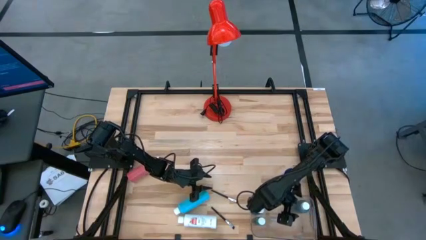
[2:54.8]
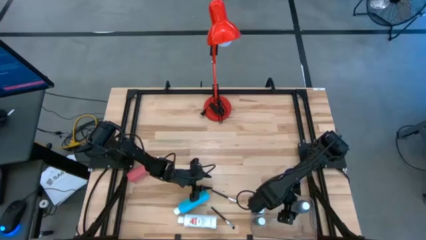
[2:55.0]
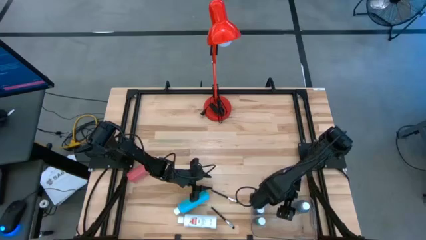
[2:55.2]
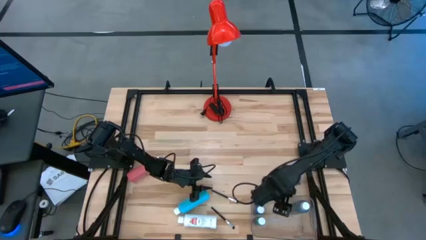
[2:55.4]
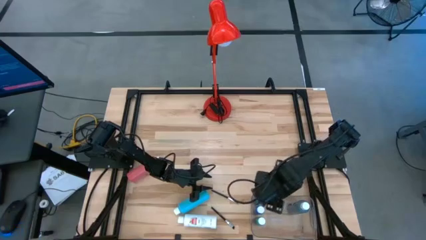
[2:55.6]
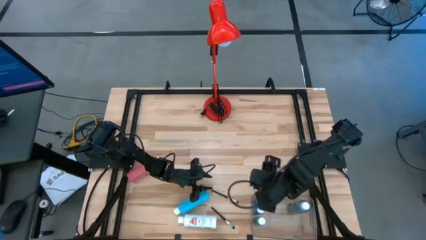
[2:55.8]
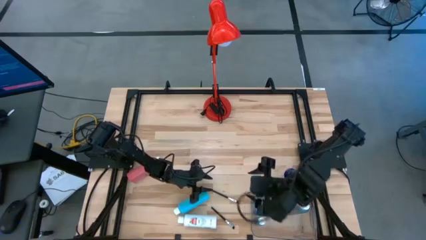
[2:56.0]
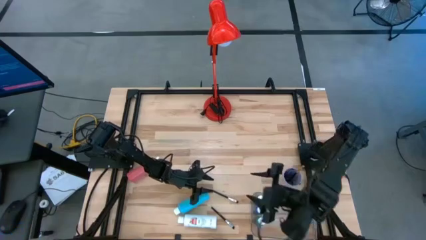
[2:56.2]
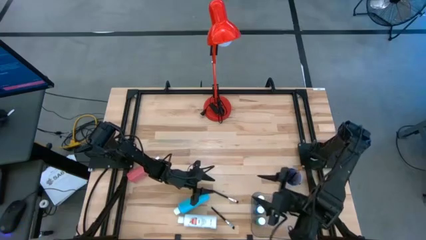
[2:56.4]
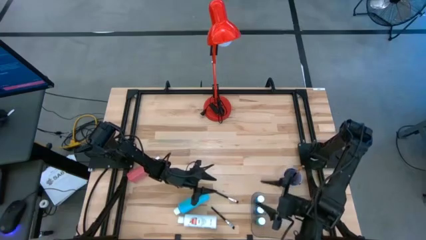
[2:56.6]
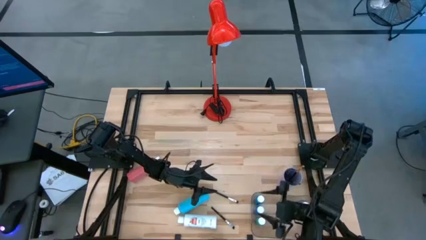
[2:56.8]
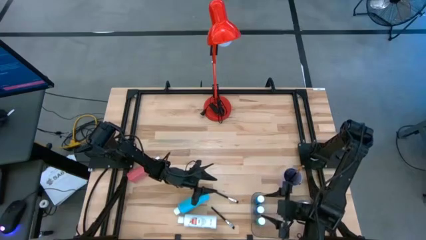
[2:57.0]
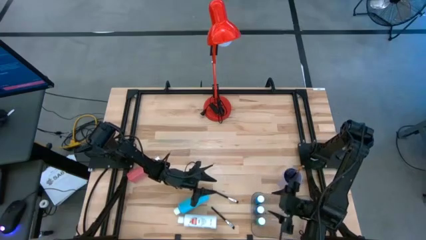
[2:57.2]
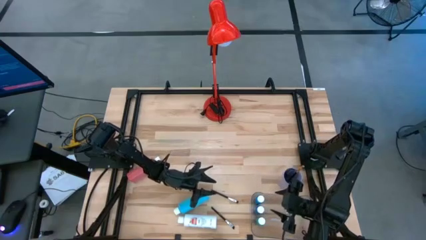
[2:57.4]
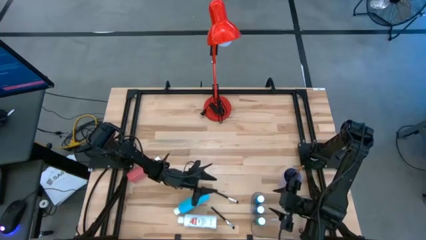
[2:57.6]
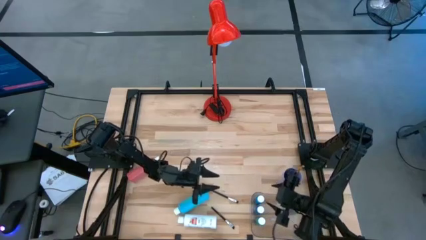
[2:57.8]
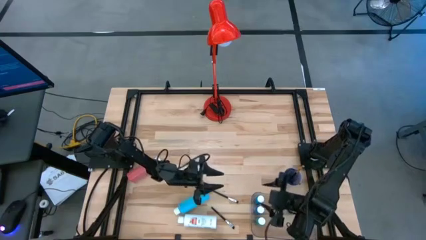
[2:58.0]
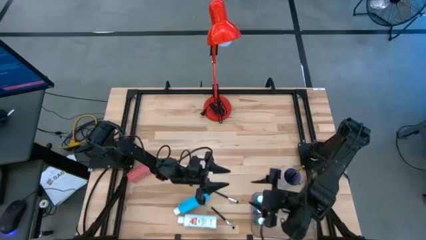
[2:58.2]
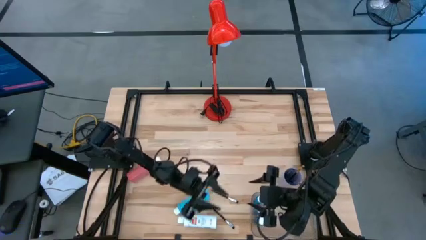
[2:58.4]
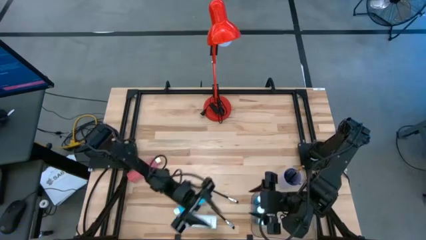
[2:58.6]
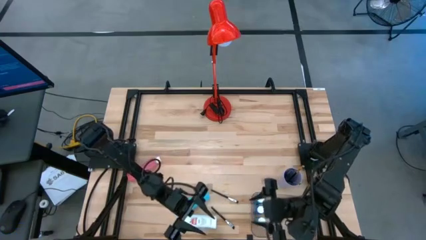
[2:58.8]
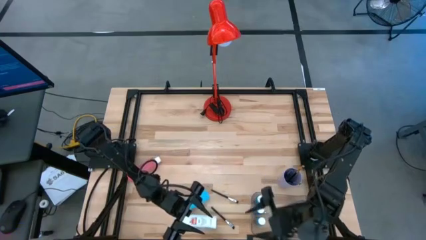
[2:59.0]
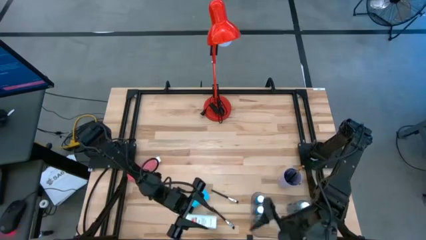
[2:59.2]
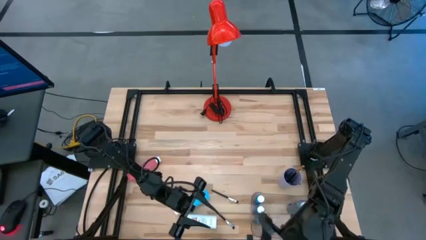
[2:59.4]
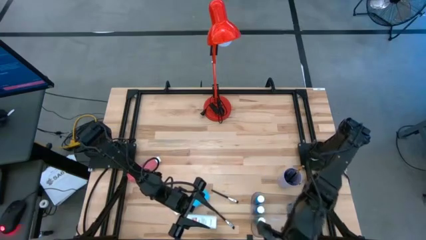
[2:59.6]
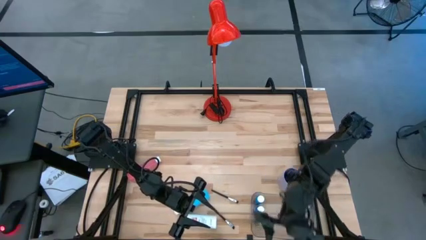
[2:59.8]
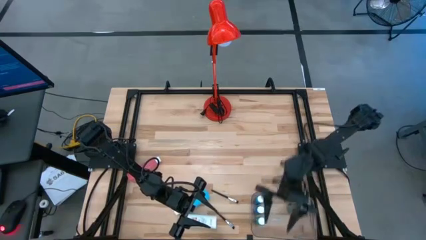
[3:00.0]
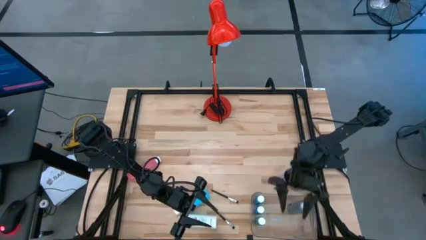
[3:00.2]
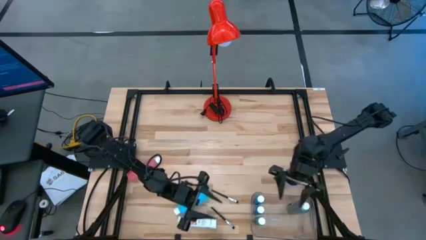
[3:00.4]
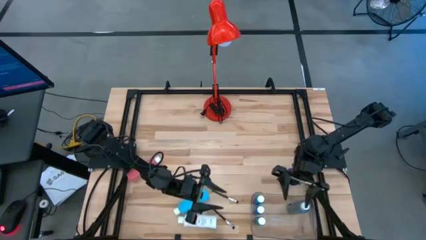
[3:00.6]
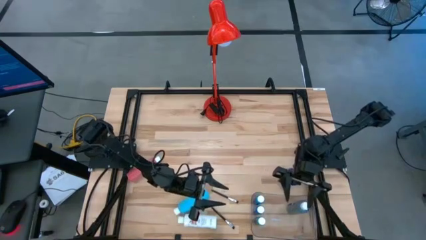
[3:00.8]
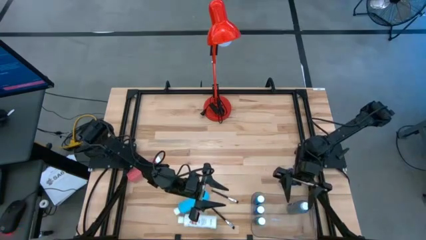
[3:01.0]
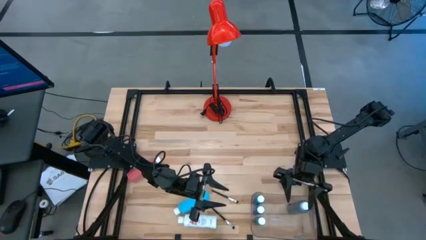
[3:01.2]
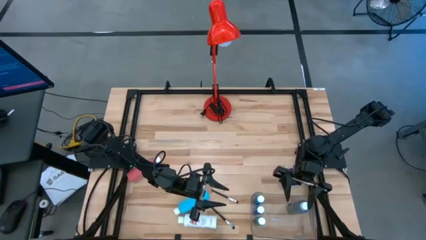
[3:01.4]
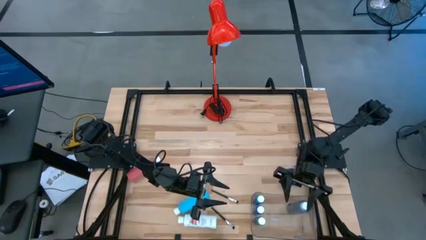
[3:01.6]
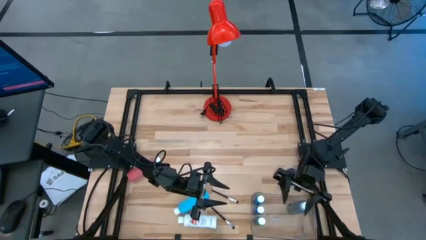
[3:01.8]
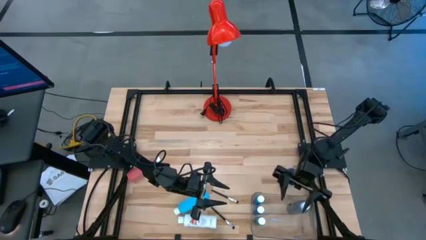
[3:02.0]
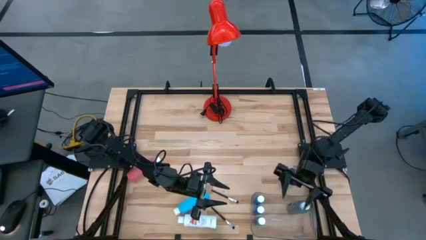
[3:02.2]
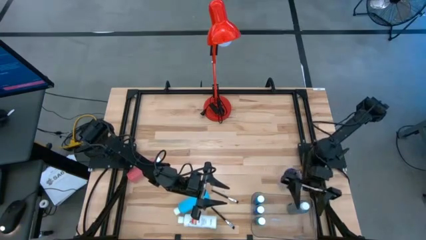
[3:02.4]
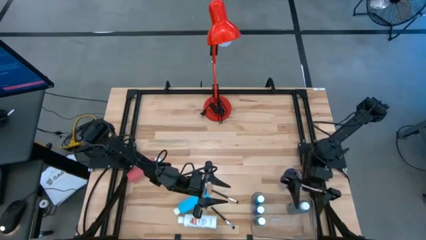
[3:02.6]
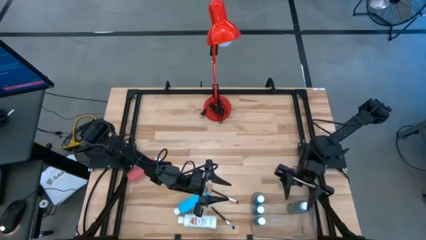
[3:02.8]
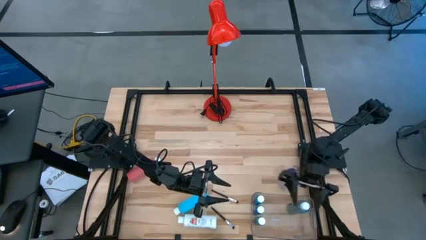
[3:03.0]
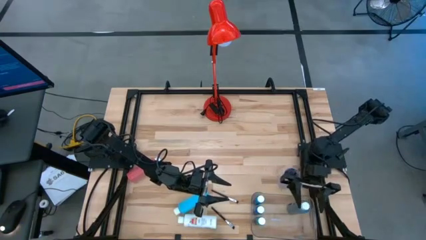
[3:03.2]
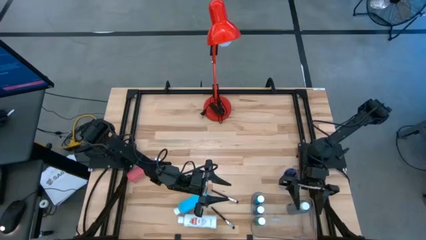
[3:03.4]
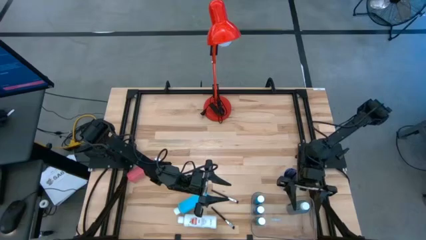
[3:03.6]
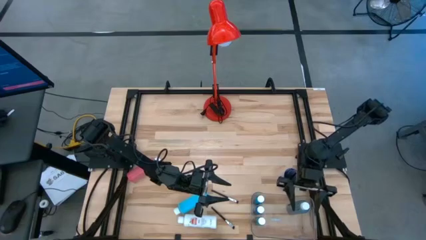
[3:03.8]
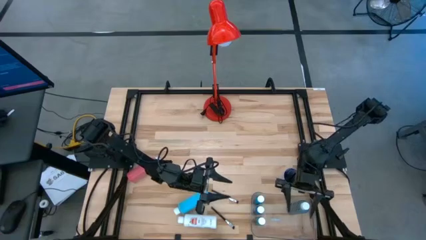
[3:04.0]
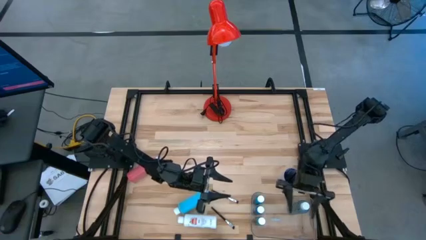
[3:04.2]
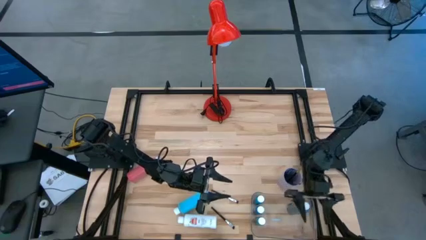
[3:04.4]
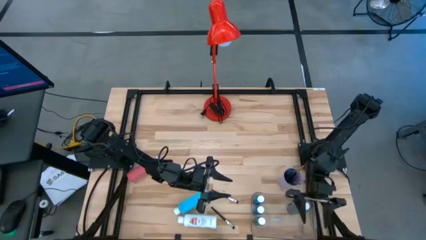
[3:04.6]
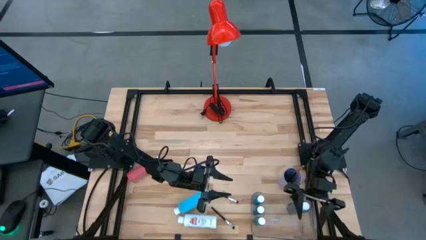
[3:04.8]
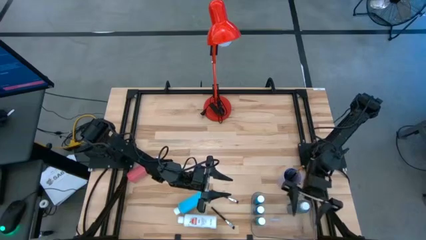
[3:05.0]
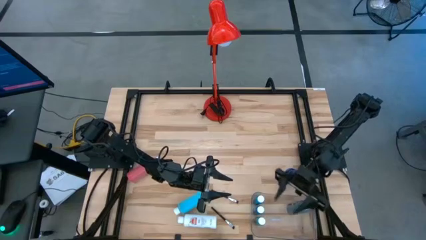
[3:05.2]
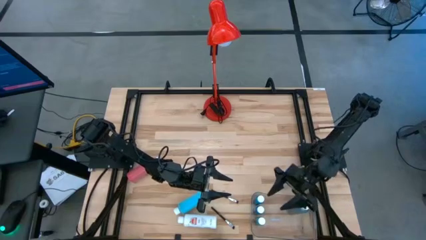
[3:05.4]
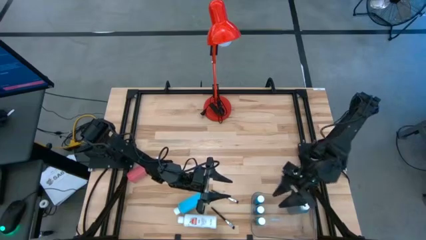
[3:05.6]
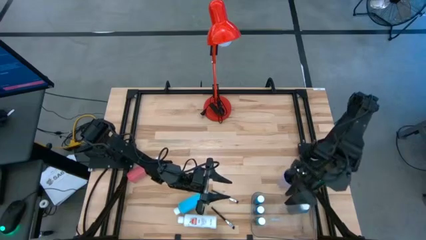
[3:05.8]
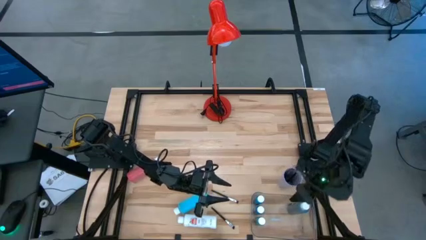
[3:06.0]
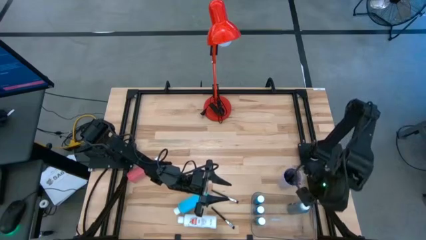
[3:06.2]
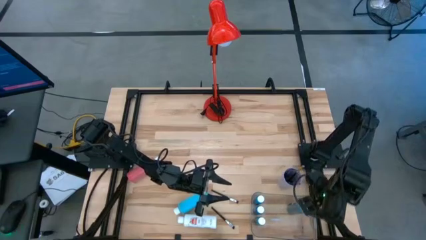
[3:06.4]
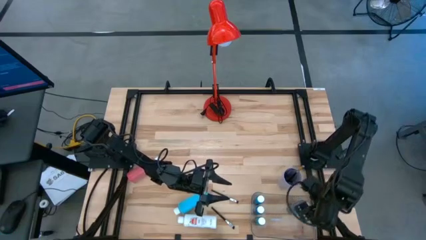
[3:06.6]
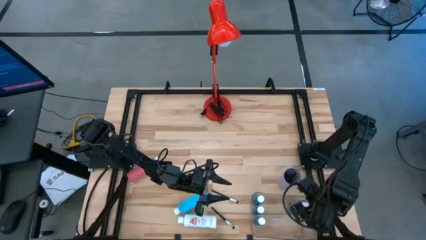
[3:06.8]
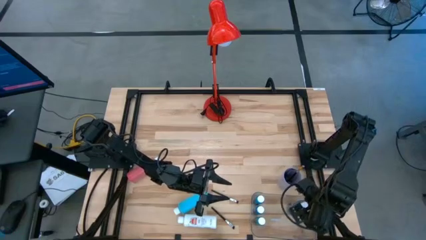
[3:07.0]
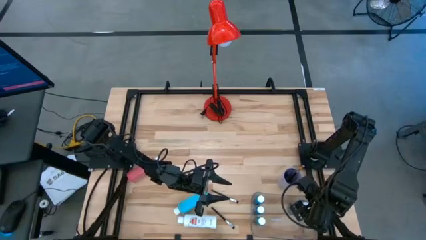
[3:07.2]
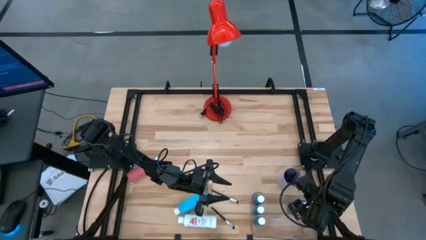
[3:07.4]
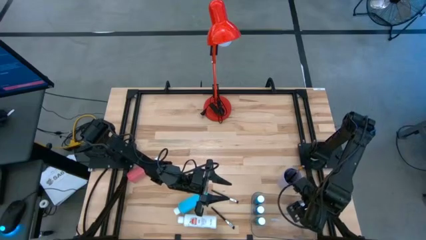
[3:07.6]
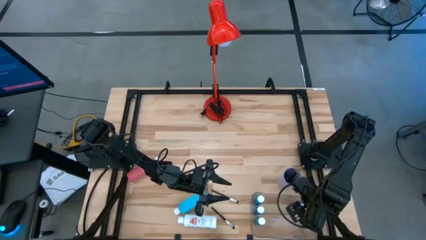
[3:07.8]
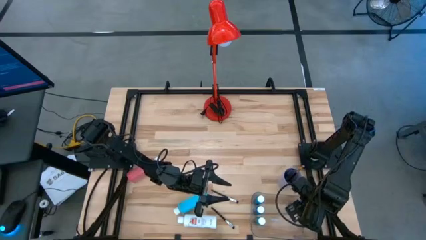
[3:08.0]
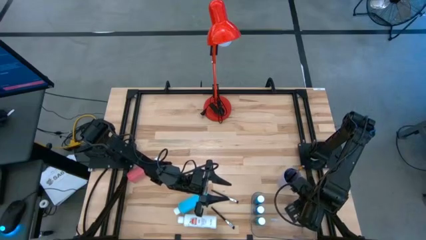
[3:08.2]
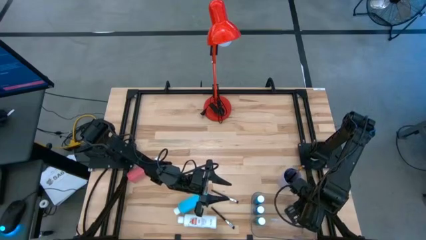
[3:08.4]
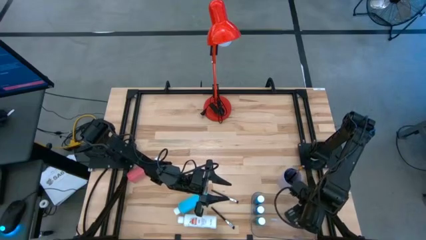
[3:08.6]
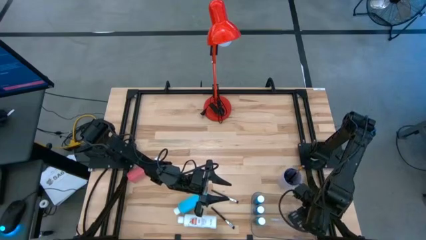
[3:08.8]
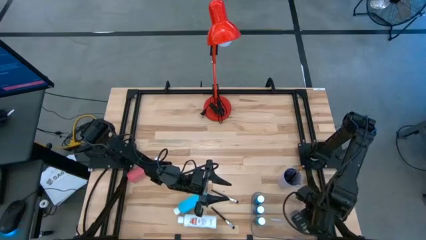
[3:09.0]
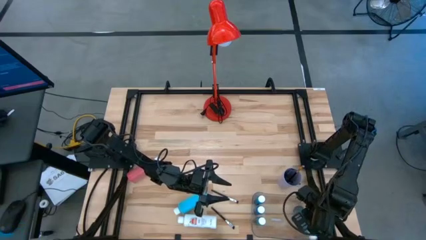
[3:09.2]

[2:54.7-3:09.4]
Task: Pick & Place Paint Supplies
Adjust the black paint bottle in the transparent bin

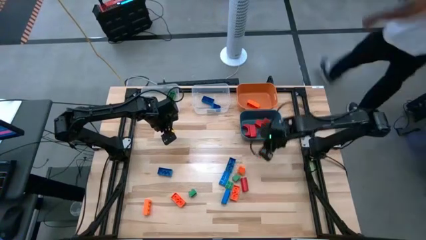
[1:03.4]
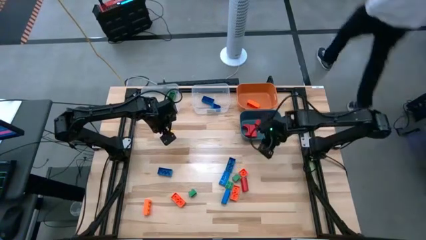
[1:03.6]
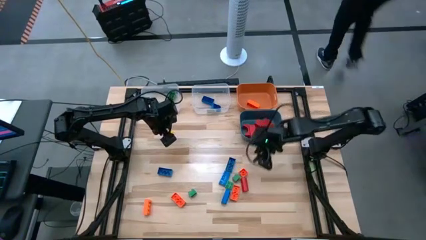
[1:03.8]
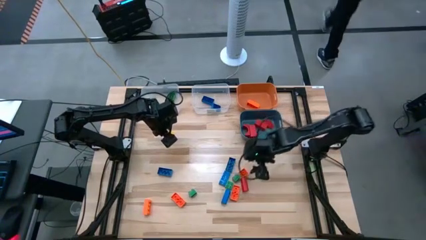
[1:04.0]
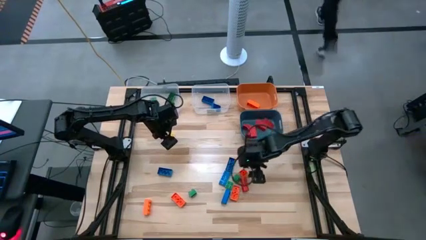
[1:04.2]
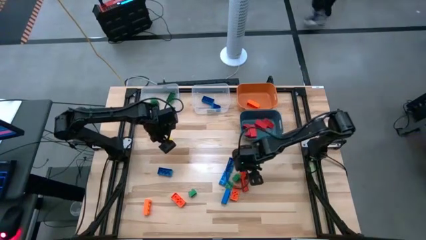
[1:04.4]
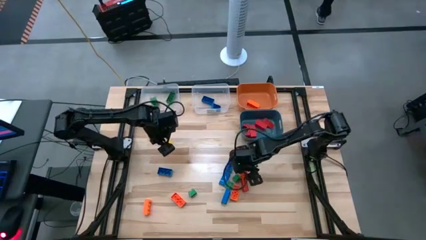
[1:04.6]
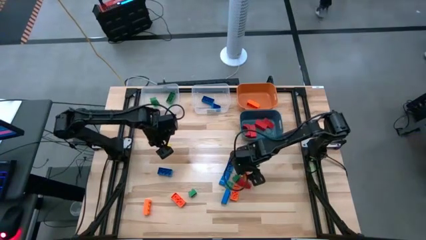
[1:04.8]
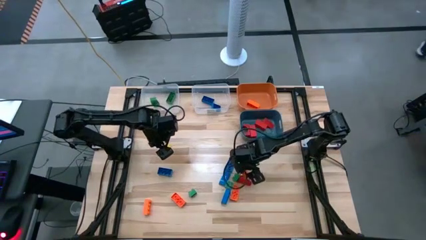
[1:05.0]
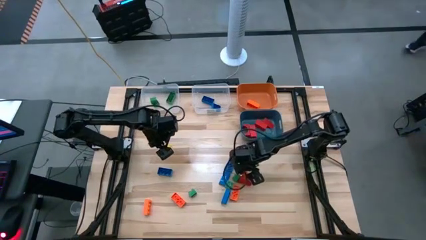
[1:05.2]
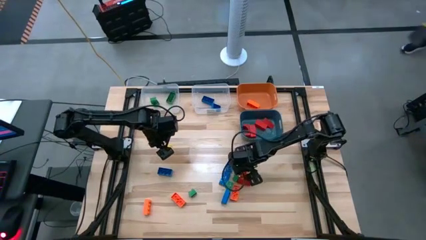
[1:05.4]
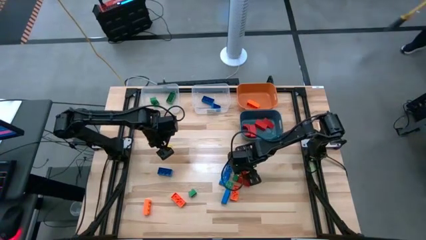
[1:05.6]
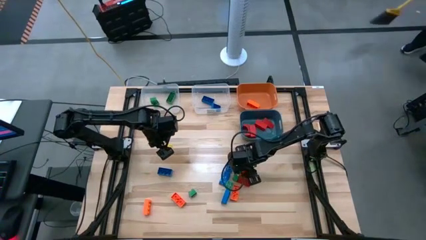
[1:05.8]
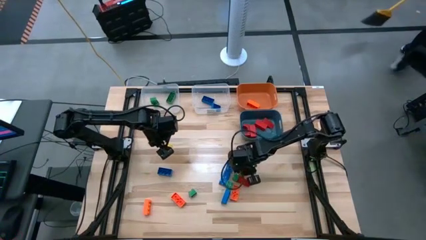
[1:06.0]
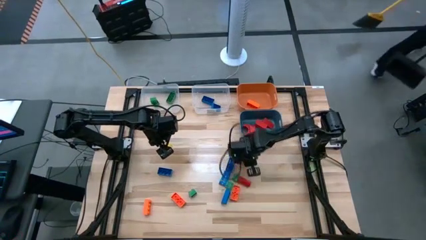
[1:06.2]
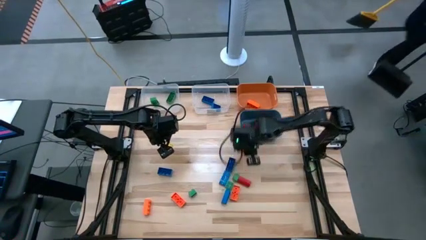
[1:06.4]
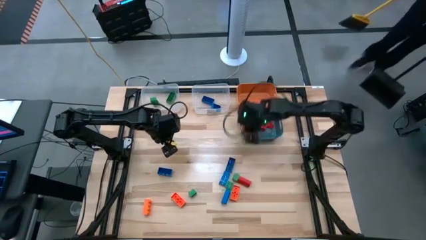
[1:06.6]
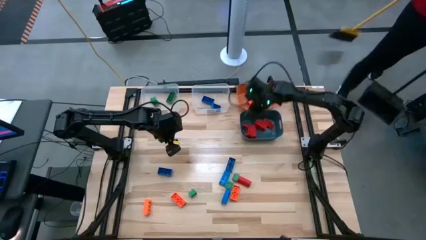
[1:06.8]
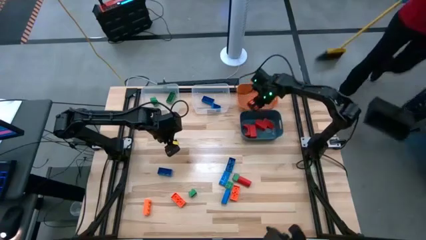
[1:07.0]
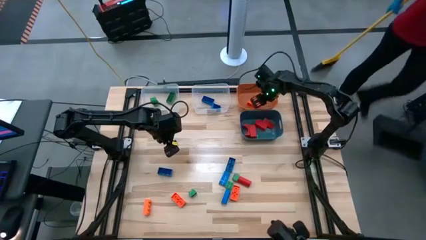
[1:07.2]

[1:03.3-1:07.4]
Task: Sort blocks
Put the orange game piece into the orange bin
